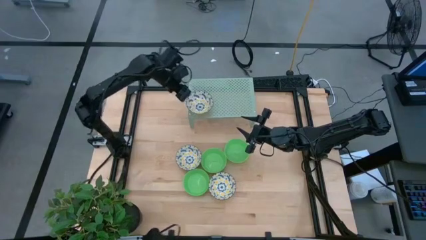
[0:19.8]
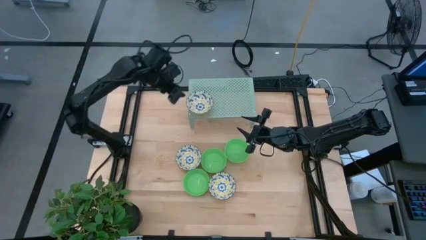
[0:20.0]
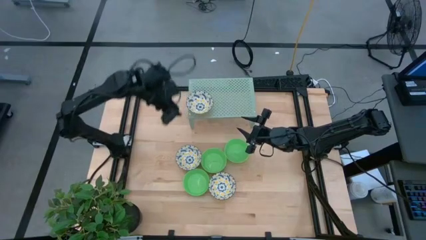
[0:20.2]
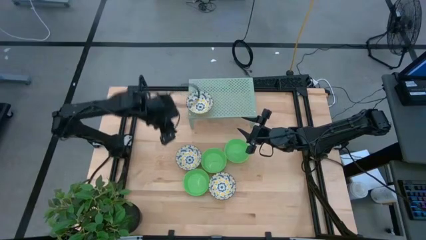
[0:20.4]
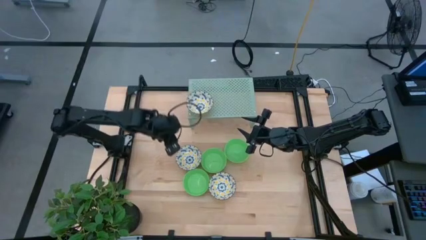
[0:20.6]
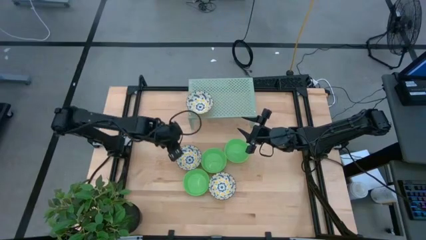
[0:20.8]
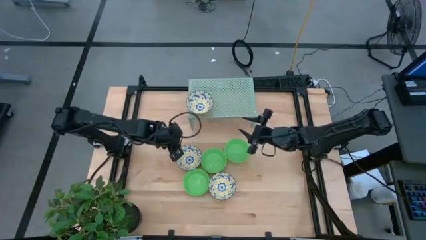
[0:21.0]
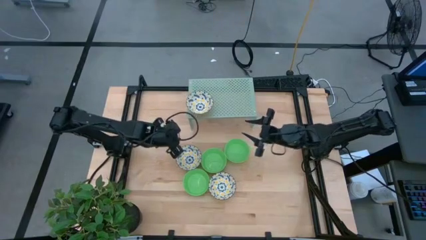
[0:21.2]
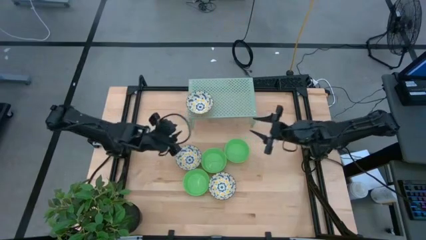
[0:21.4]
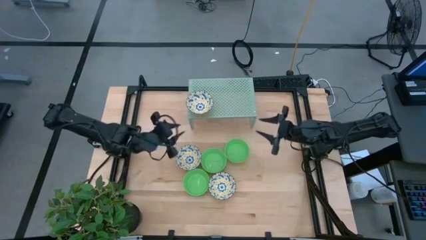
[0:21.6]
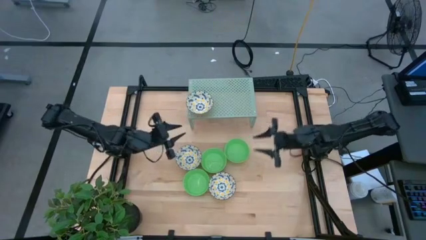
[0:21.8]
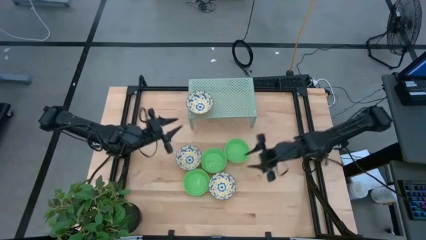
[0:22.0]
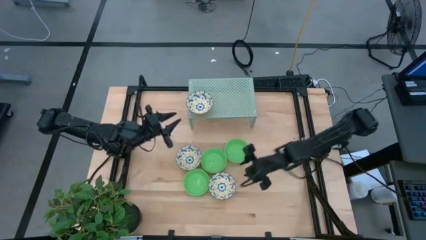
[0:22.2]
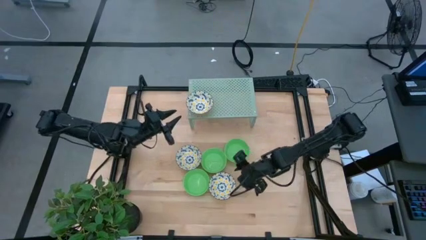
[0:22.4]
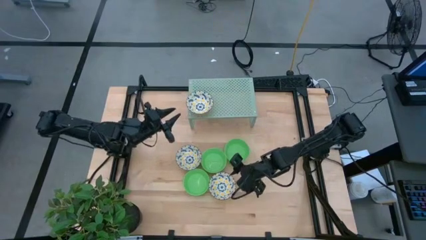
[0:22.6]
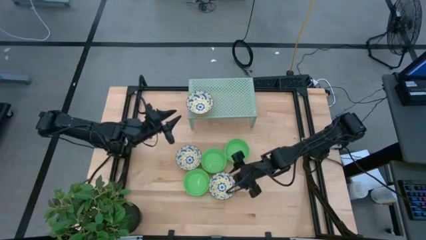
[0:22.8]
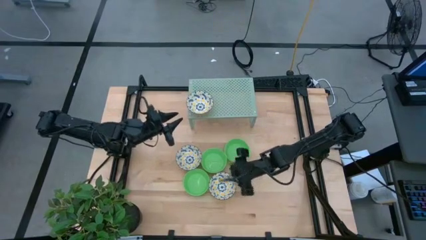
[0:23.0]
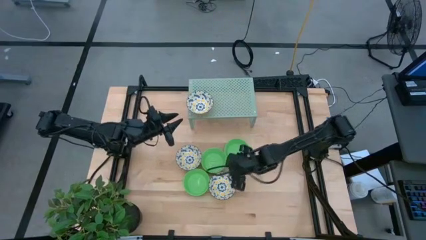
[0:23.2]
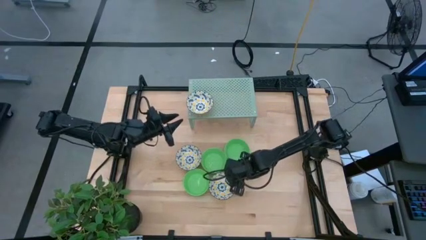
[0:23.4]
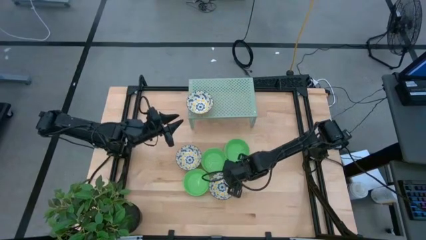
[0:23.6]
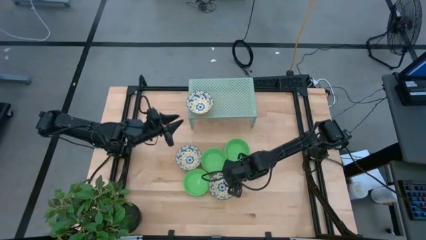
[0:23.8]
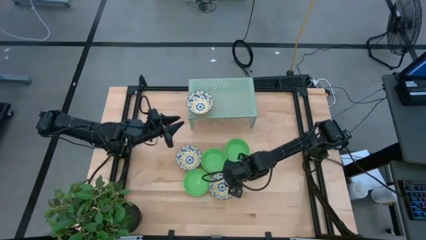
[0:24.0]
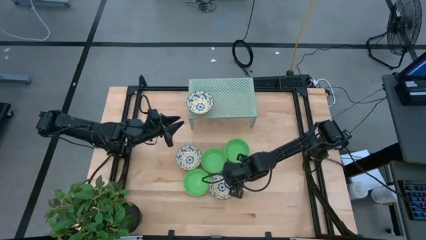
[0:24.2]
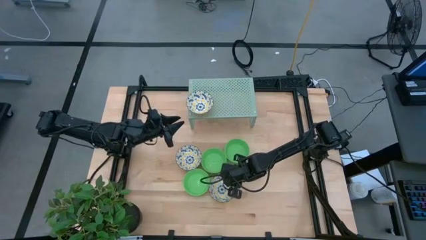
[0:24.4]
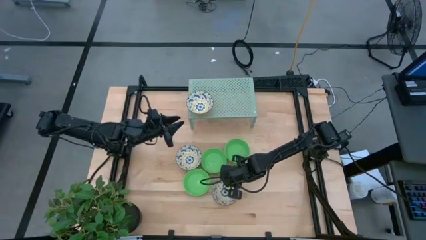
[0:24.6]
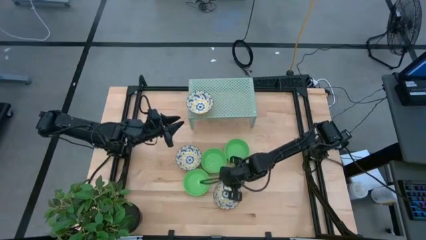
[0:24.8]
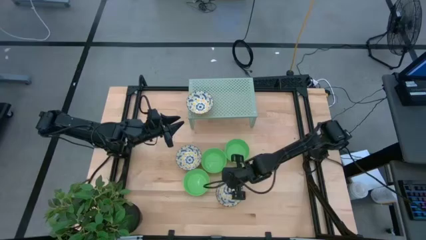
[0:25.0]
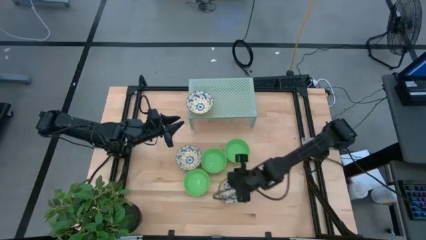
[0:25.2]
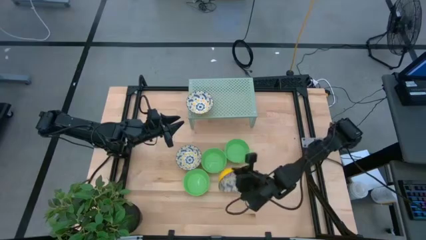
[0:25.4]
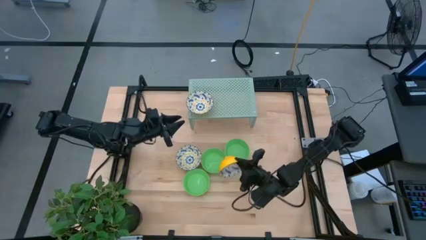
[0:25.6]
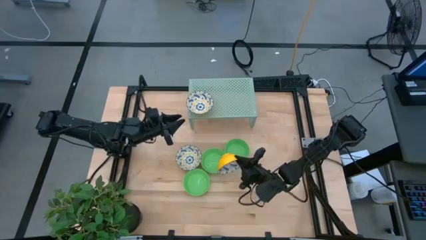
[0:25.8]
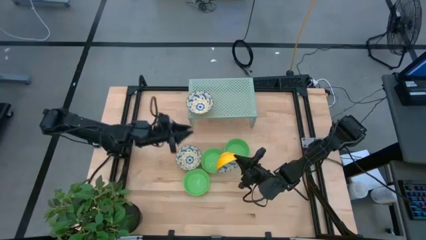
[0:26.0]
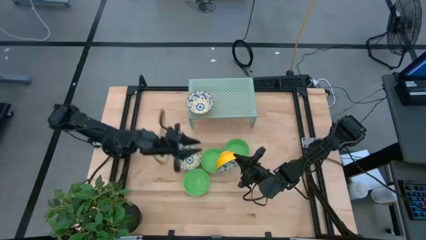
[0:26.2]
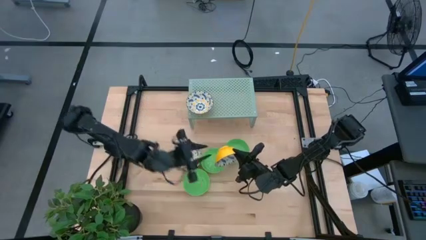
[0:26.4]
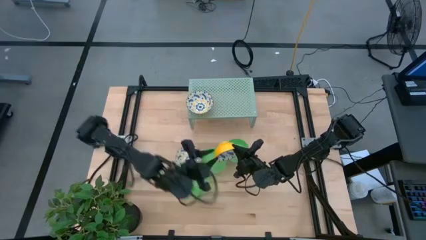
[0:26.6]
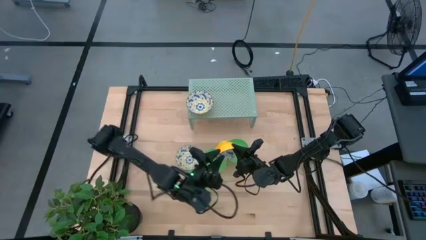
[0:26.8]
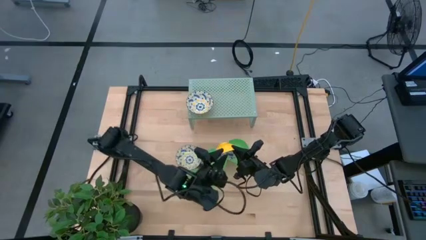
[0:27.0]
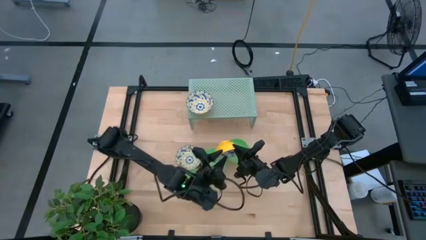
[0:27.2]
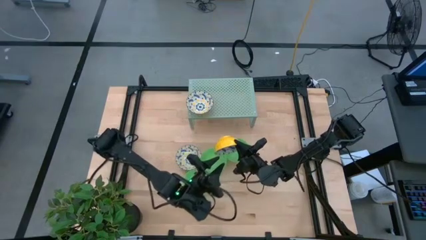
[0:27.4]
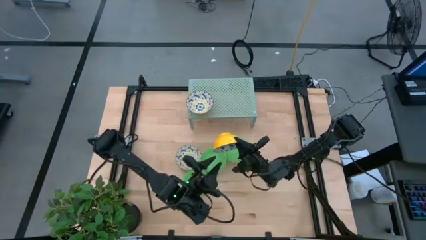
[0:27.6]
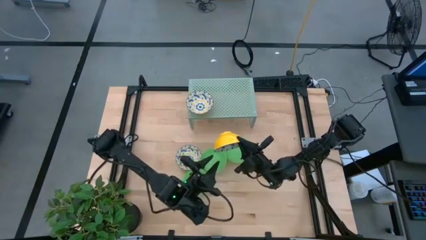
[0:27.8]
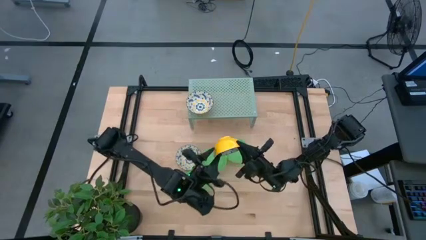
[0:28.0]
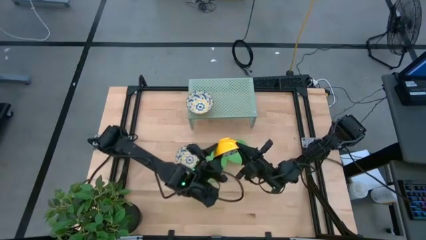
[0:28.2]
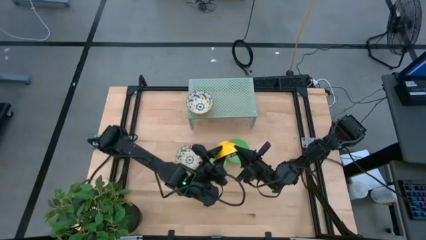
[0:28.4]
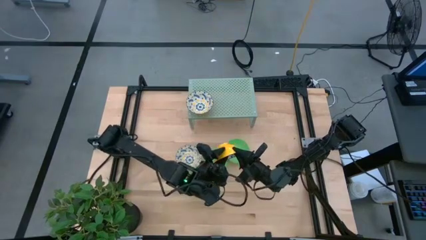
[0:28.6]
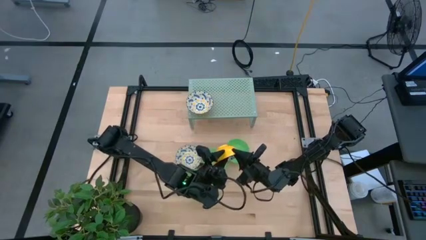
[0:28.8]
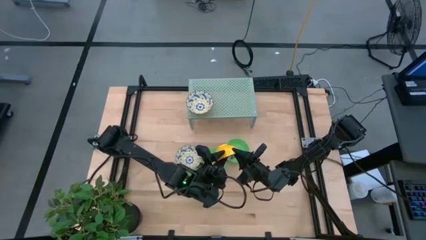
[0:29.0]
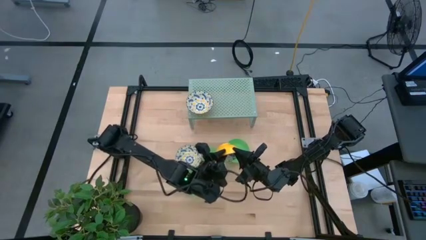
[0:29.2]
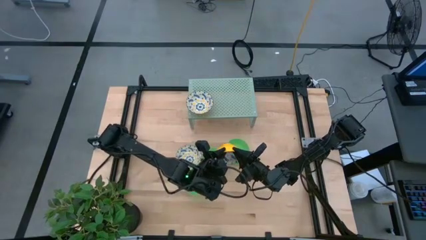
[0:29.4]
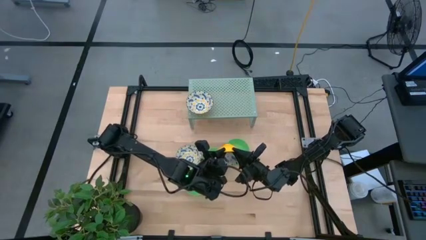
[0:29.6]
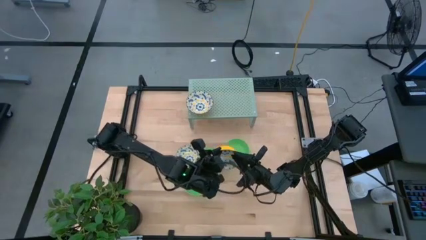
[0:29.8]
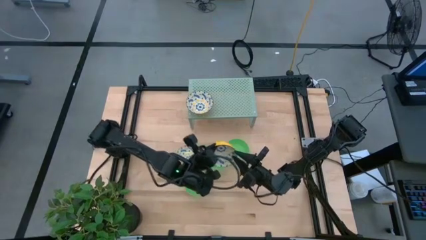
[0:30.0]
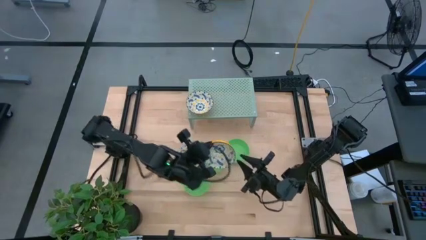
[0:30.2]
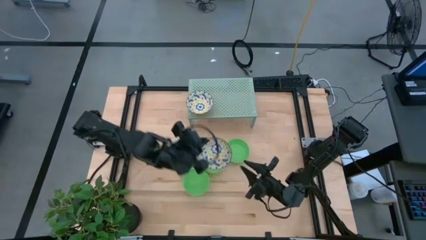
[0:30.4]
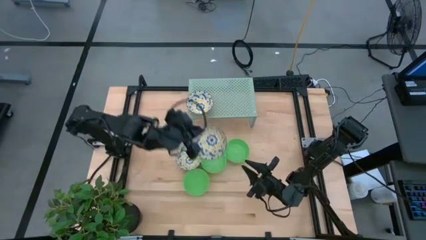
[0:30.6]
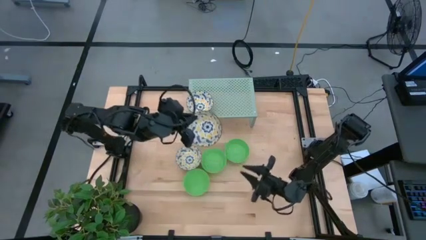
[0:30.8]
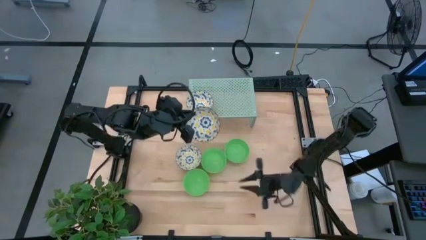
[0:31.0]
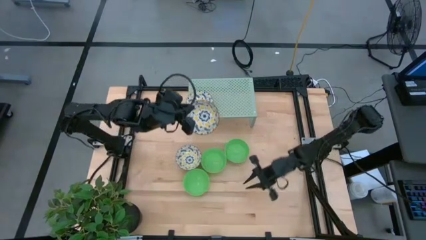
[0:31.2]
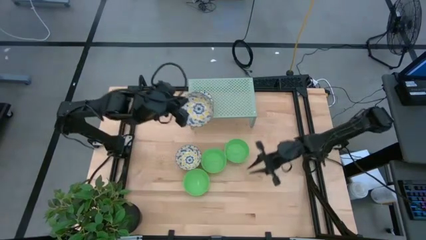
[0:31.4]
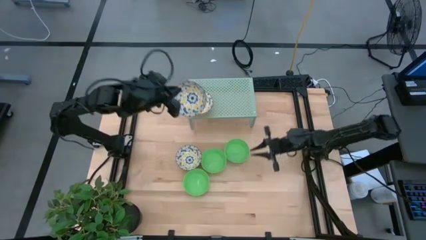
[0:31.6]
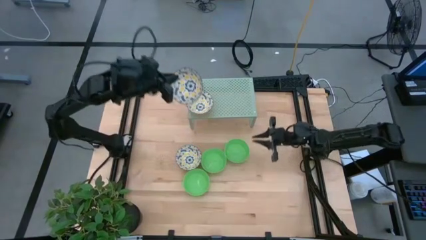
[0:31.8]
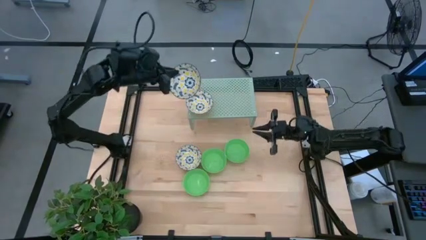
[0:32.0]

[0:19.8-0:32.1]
Task: Pick & Place Mini bowls
Stack the bottom white patterned bowl on top of the white patterned bowl on the shelf

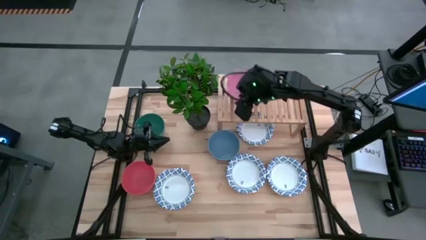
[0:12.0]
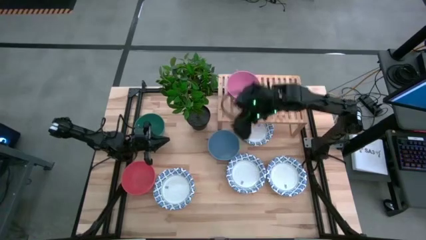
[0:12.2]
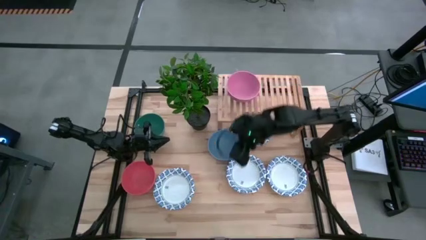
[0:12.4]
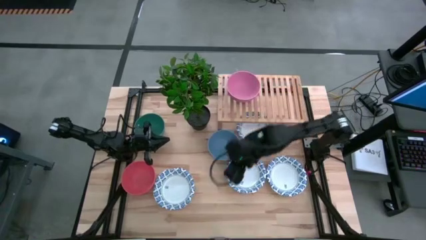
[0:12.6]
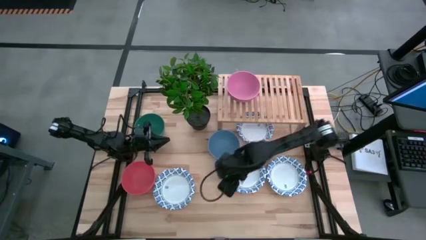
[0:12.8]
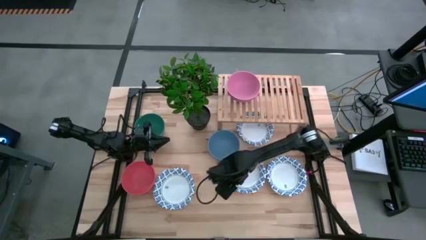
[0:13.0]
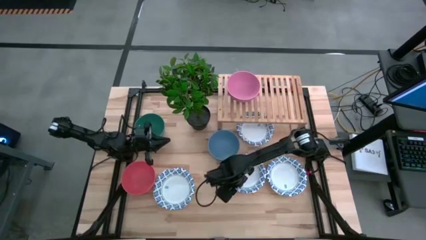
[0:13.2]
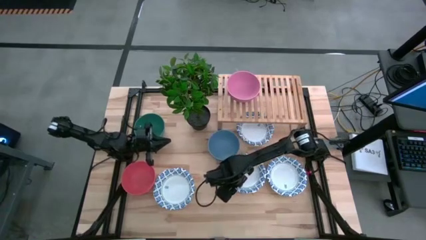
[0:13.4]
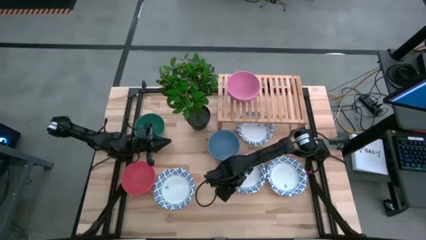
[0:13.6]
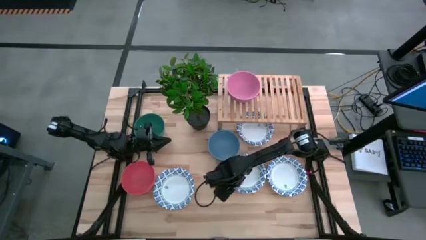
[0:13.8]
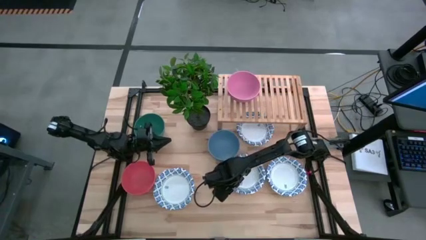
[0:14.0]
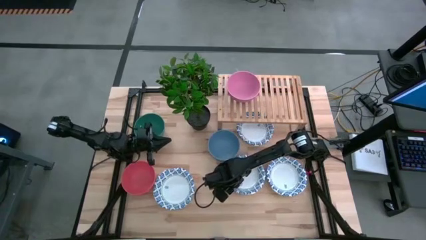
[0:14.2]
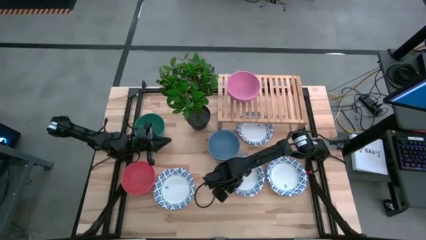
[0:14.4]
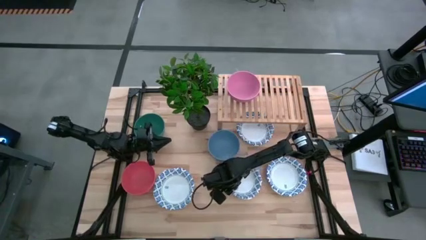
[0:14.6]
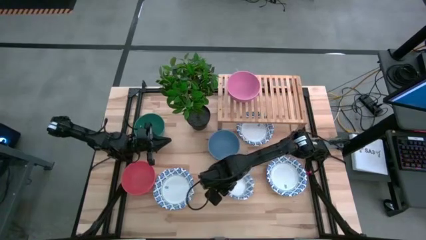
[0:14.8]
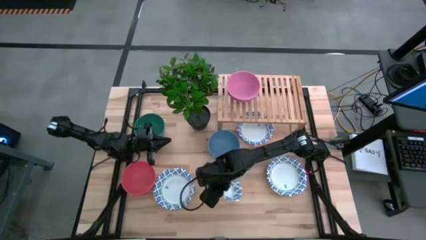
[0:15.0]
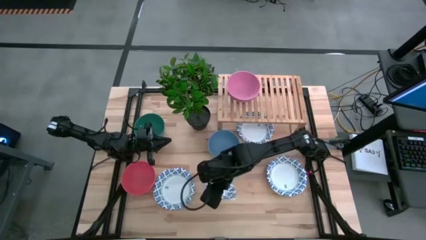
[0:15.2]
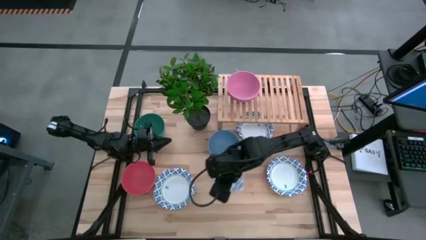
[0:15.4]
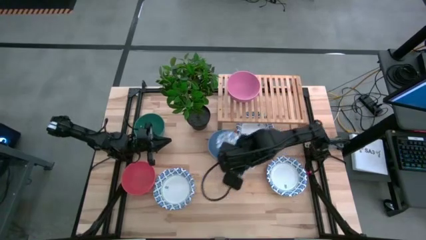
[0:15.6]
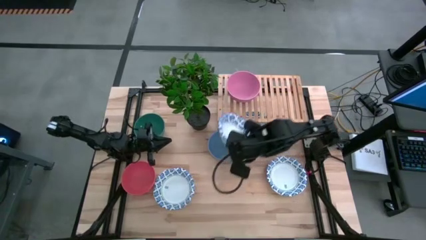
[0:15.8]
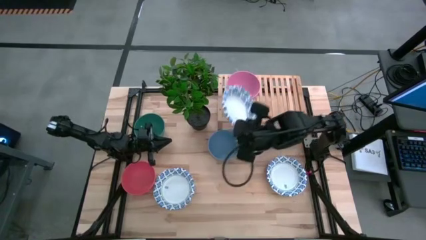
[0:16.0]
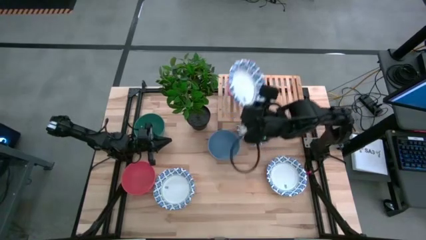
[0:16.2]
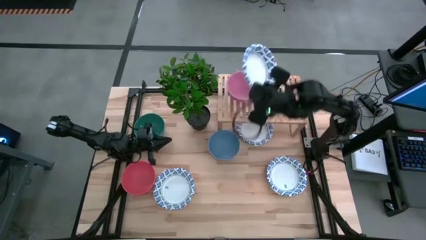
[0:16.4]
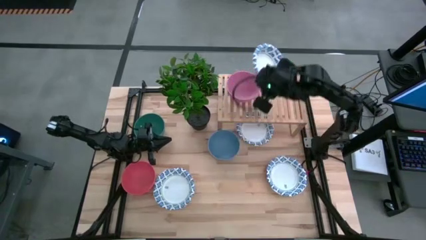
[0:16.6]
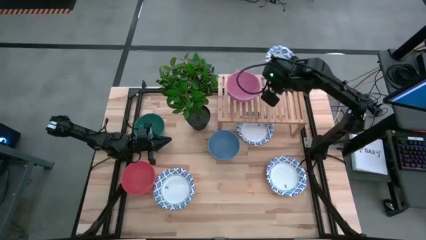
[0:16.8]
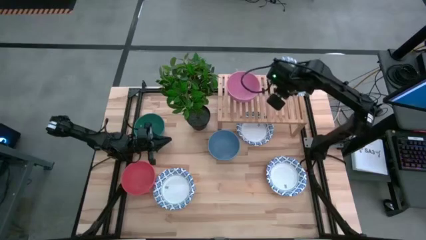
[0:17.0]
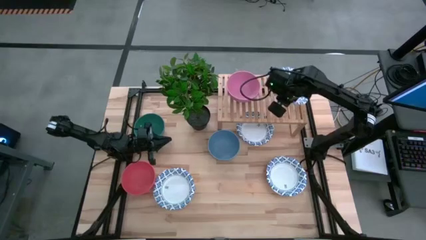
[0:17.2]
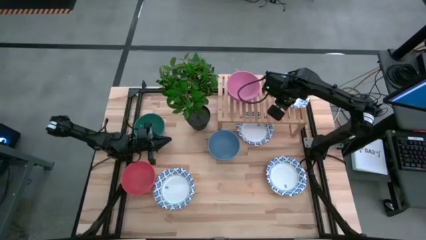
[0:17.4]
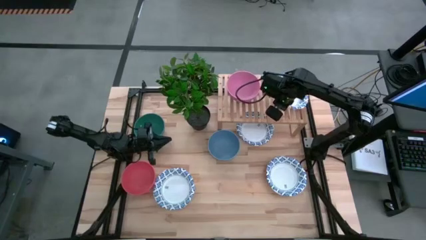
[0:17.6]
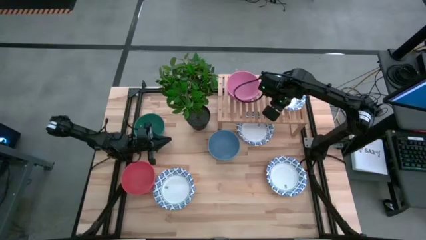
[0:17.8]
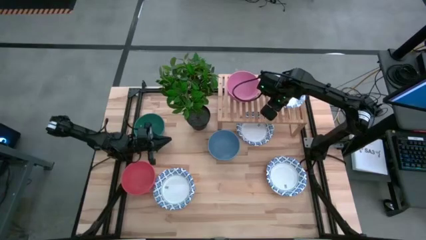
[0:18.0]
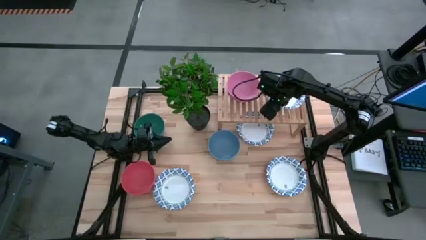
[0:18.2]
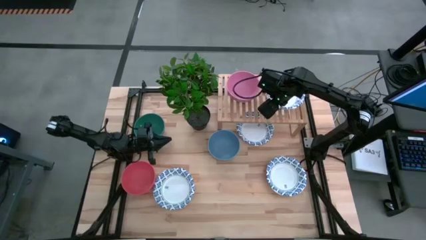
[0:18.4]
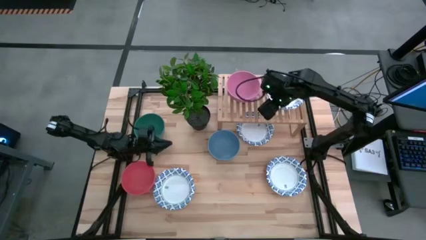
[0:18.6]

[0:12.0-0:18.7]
Task: Place and stack bowls onto a shelf
Put the white patterned bowl on the shelf
